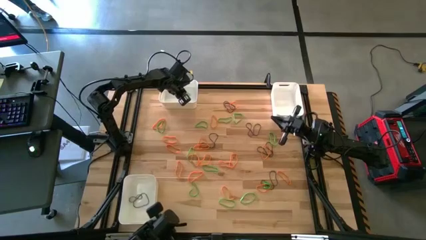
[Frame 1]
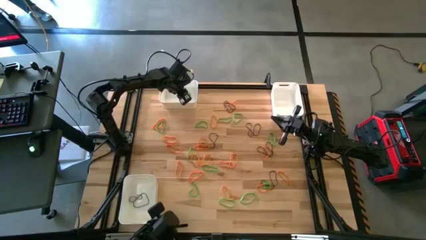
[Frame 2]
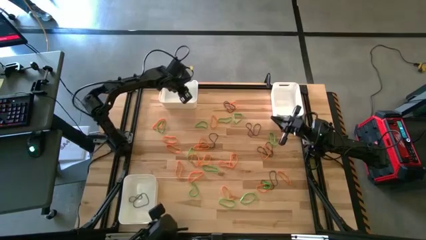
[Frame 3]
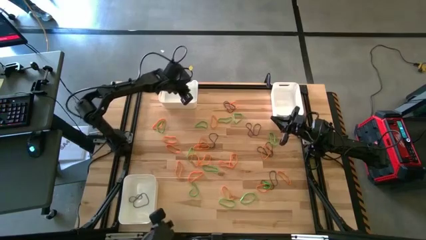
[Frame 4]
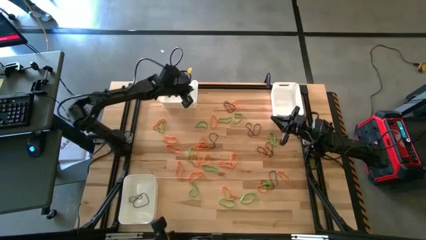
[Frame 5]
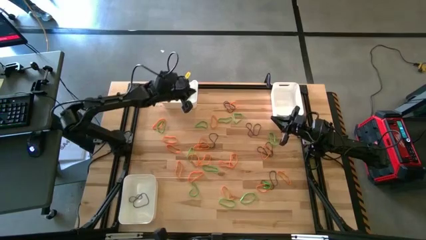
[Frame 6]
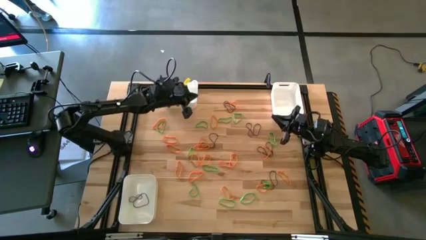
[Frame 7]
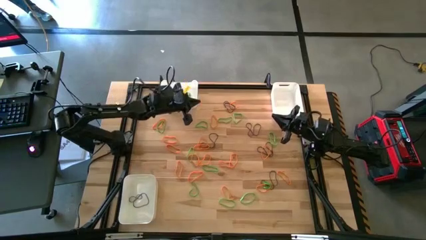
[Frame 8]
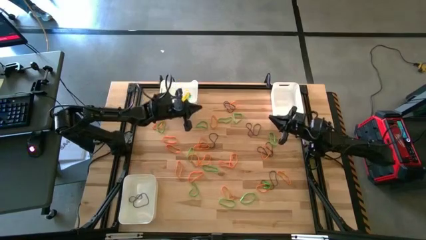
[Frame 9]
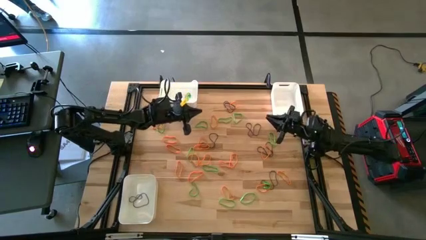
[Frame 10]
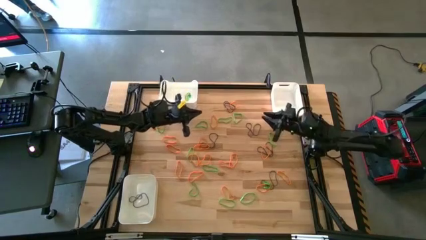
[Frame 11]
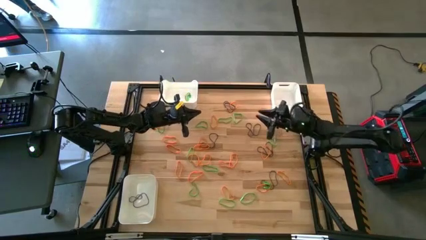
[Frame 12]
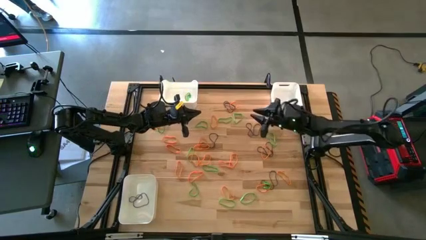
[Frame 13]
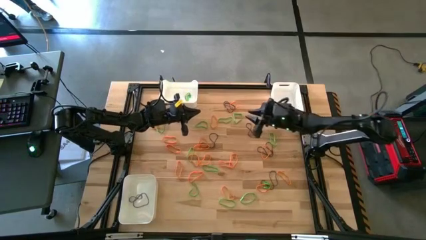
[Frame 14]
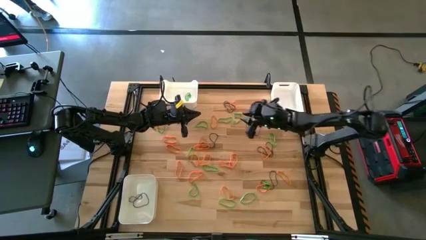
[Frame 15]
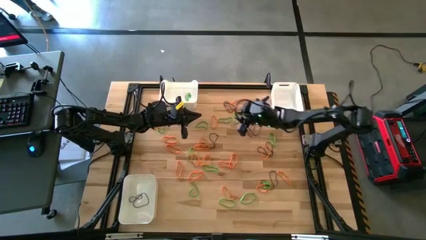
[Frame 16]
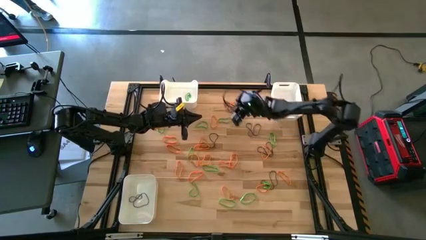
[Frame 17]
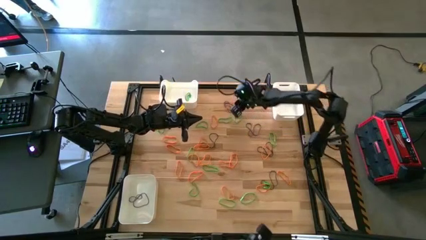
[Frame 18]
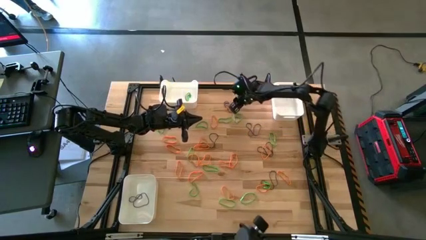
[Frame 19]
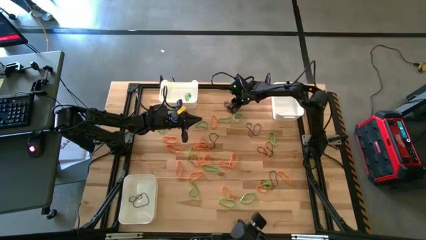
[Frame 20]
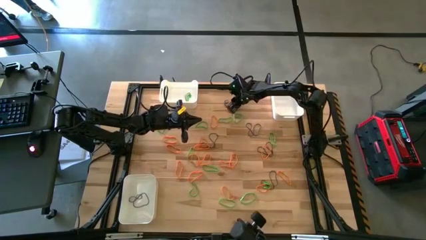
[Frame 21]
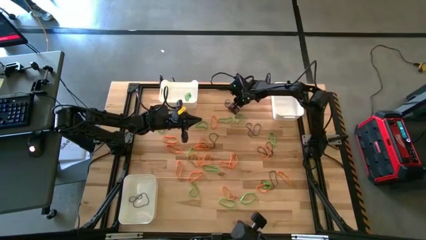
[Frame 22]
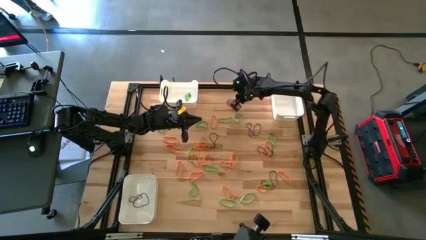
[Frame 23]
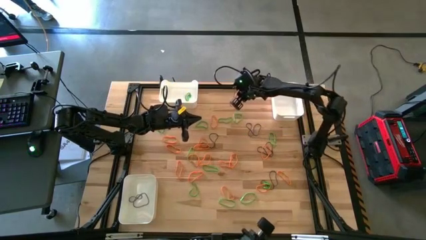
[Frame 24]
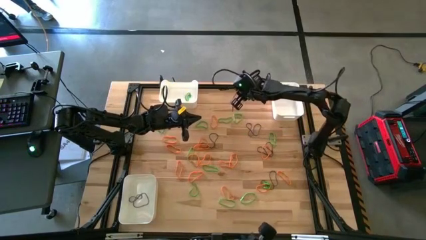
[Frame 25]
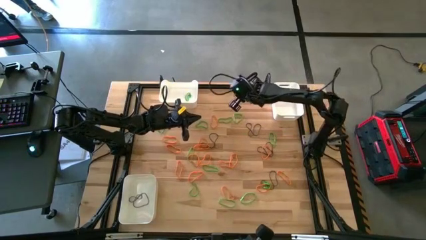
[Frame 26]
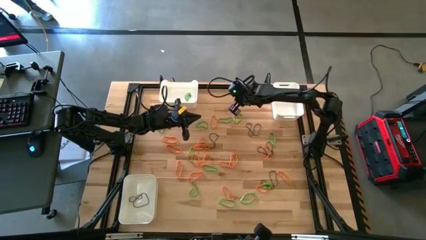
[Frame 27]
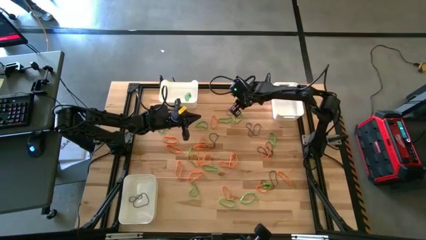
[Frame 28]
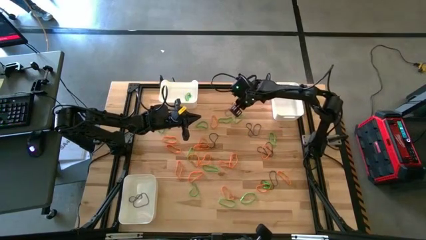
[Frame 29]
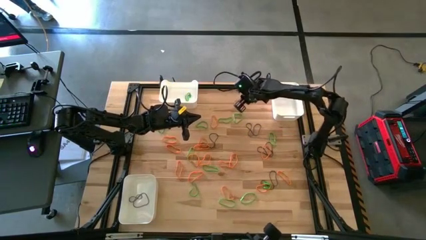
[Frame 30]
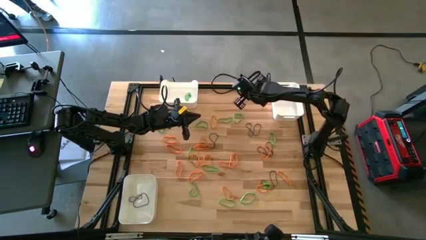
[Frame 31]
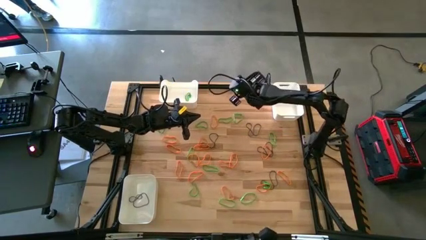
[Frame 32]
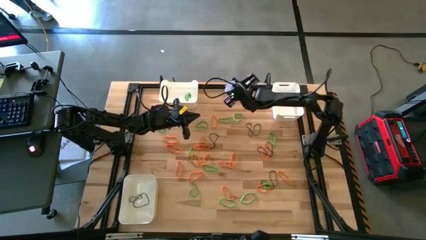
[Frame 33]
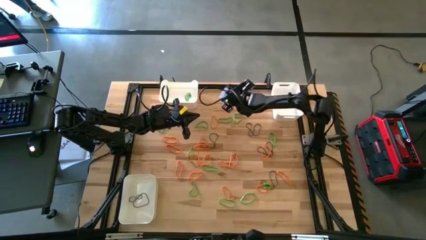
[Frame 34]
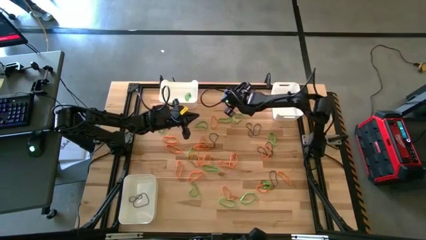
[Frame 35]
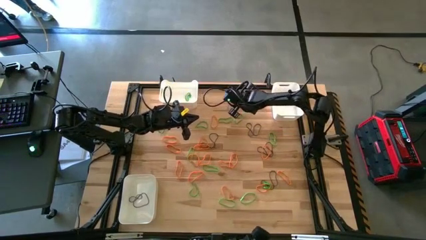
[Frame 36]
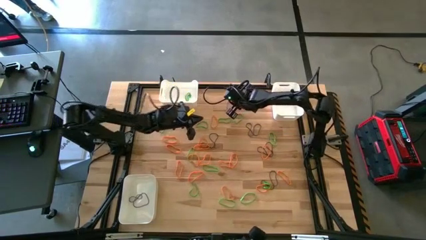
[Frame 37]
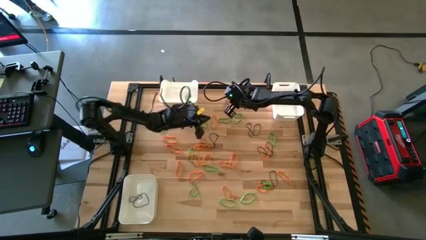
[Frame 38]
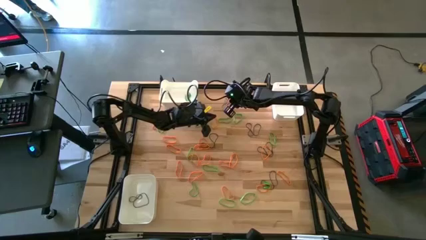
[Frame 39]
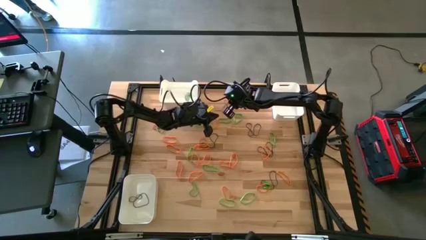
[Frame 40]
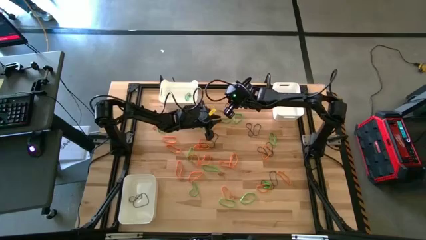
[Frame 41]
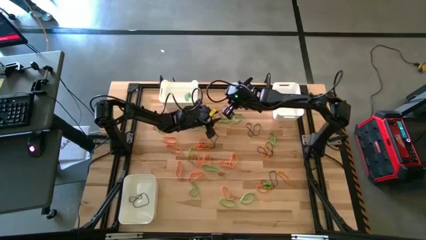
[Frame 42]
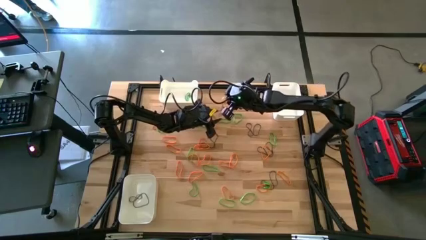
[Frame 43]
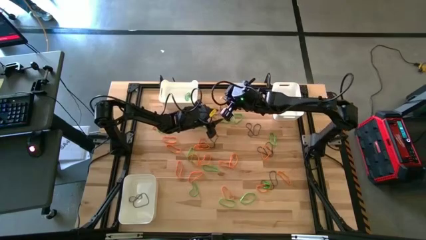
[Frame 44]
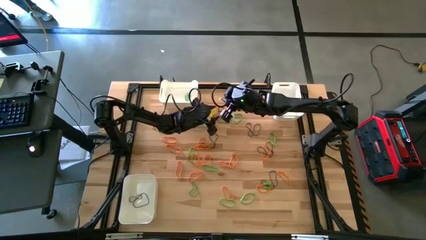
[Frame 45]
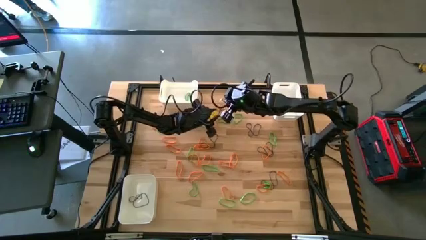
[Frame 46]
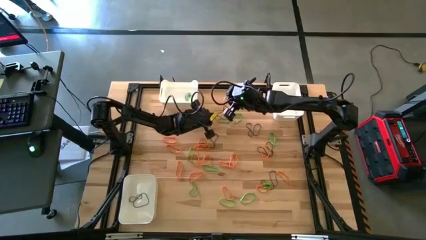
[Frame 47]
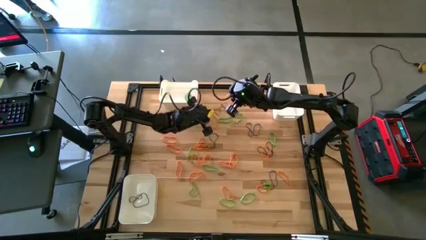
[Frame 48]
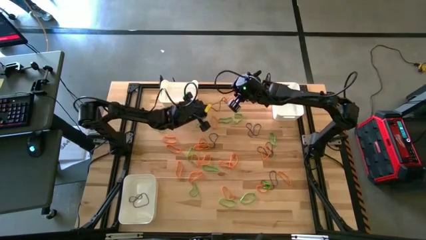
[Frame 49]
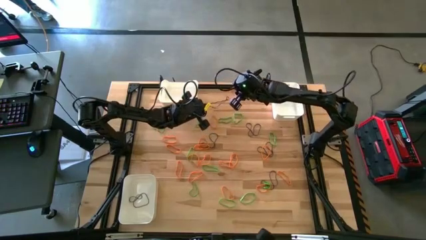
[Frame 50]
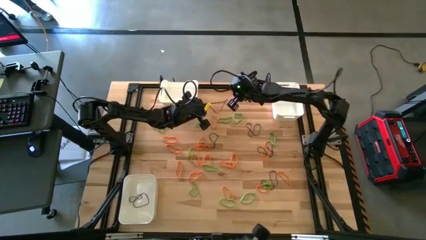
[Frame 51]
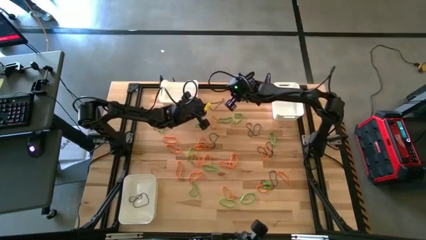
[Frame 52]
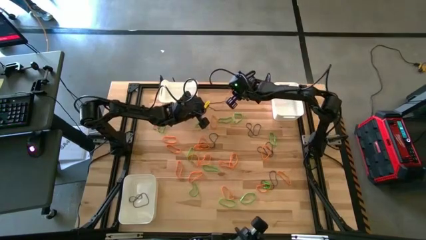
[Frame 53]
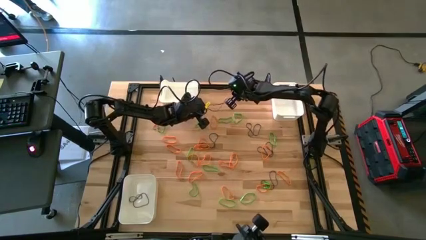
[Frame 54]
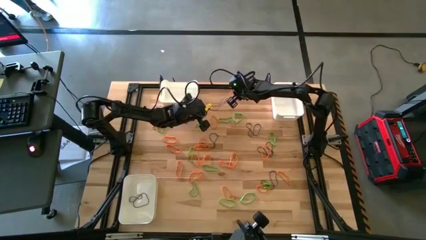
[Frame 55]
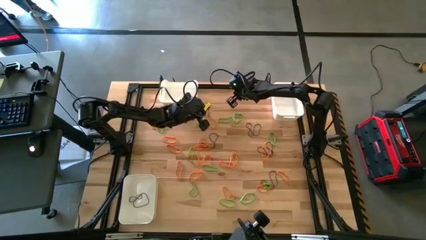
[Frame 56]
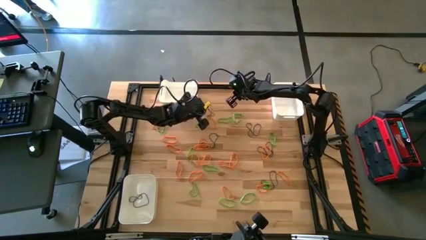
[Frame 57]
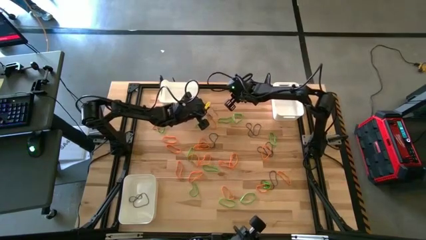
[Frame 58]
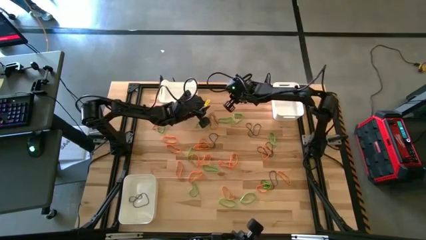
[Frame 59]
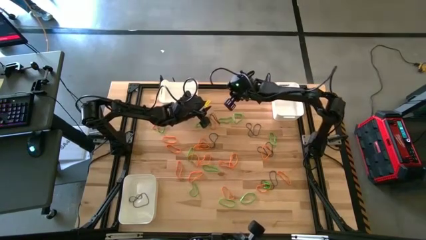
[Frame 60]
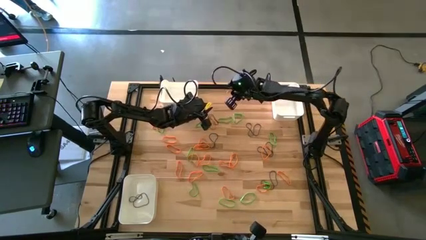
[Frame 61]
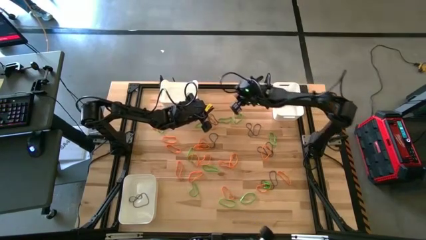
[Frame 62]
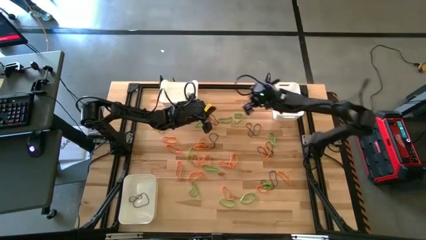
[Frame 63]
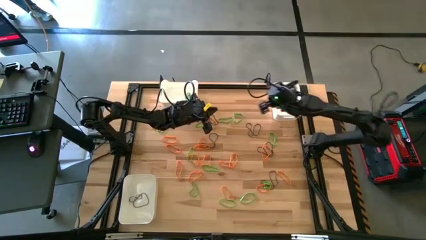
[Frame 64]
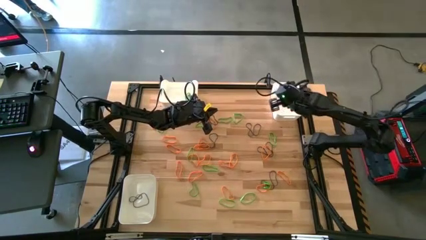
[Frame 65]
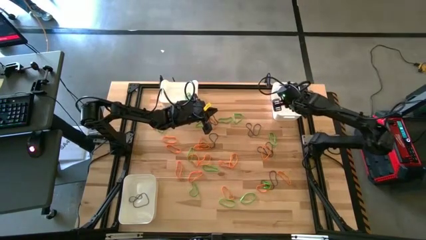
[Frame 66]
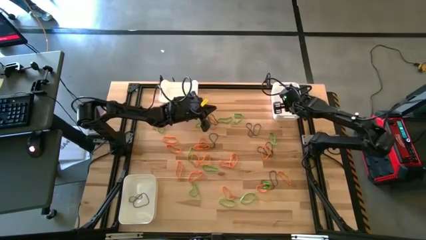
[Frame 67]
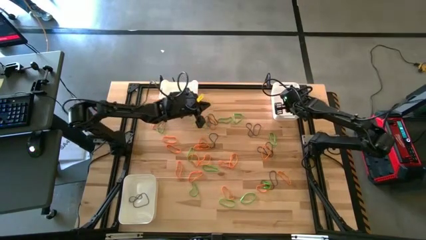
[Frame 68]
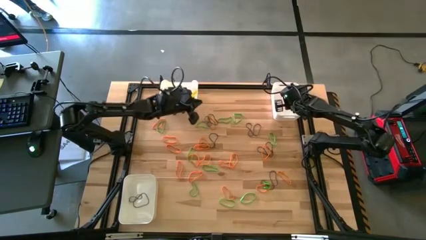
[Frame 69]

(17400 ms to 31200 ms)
Task: Sort rubber bands into baskets
Put the orange rubber band into the top right white bin

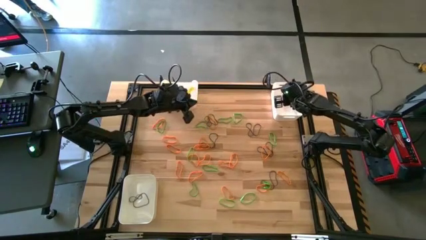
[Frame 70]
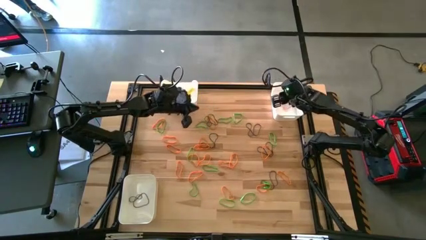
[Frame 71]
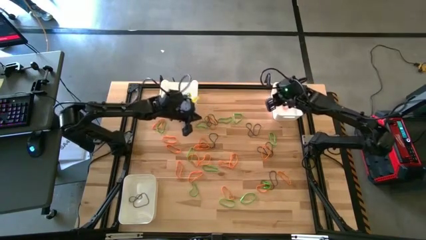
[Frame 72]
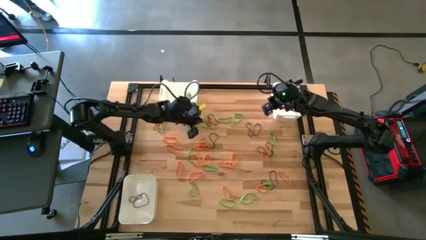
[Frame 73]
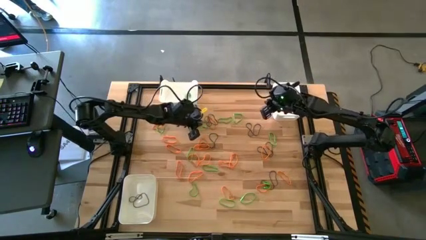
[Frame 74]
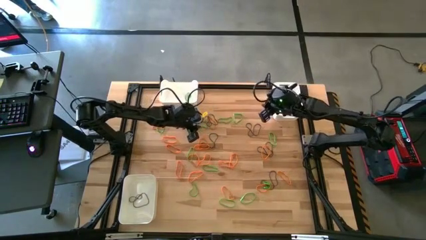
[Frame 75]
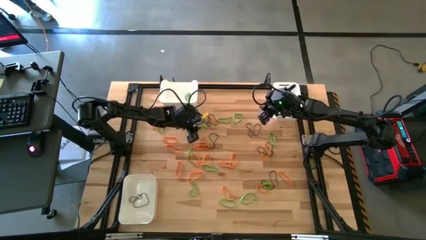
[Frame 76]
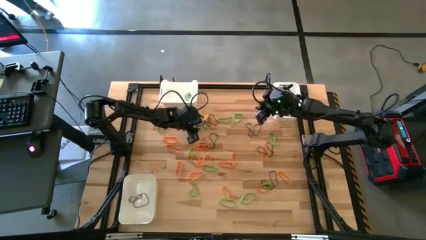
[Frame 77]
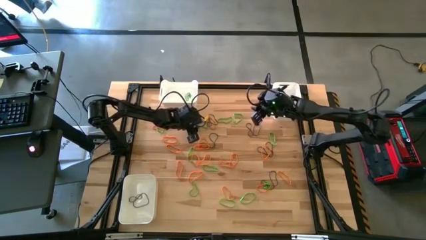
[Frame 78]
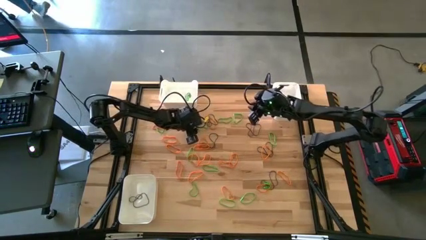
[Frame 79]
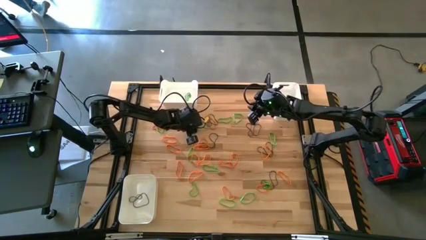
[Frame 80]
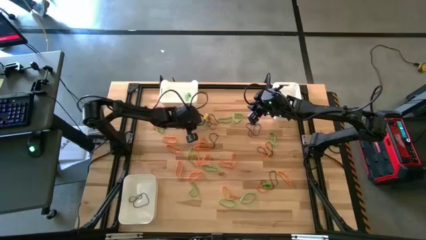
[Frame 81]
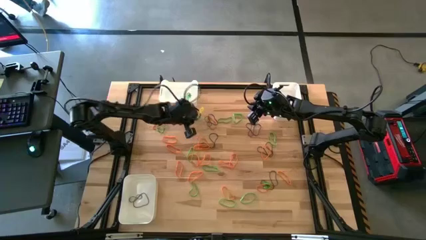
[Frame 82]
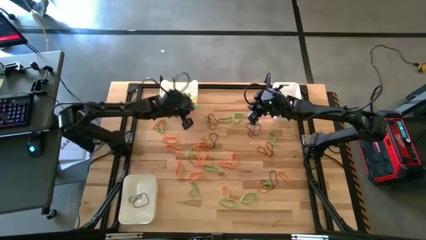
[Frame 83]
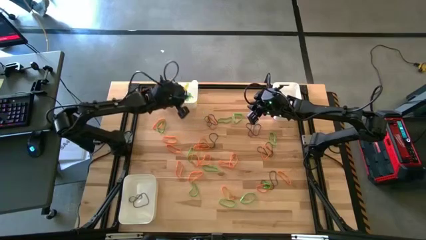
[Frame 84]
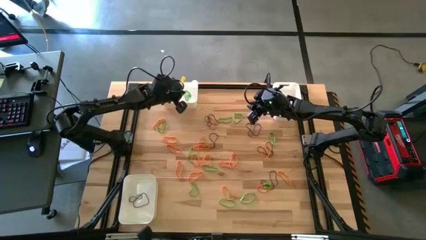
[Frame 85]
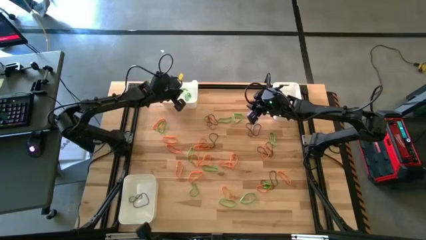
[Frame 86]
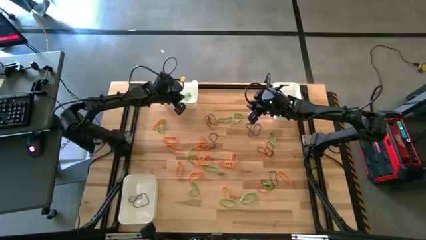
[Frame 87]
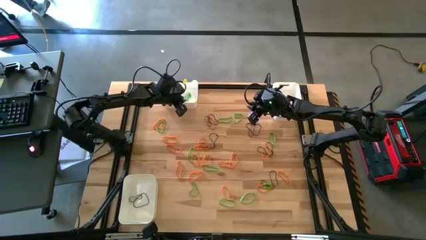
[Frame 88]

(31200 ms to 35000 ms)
Put the green rubber band into the top left white bin
